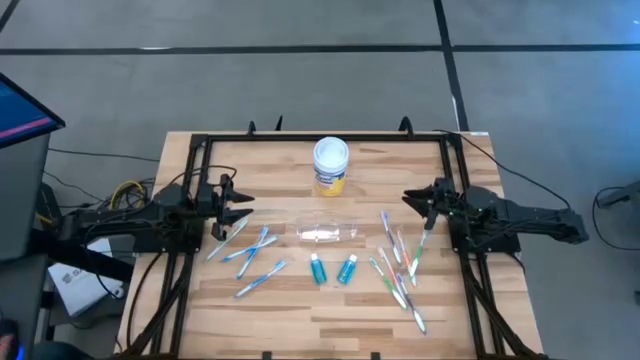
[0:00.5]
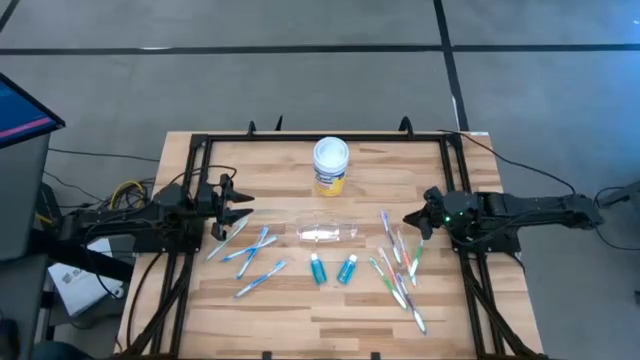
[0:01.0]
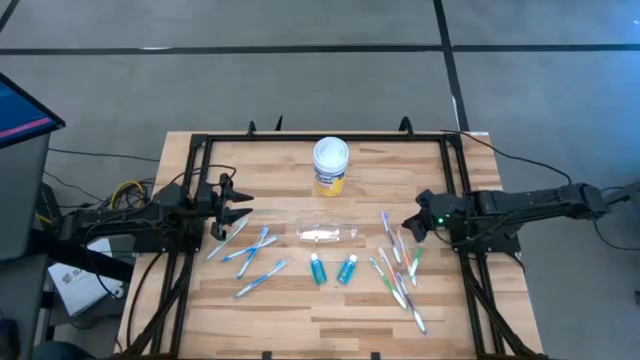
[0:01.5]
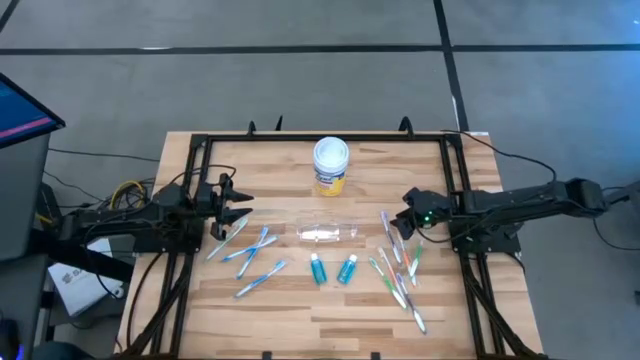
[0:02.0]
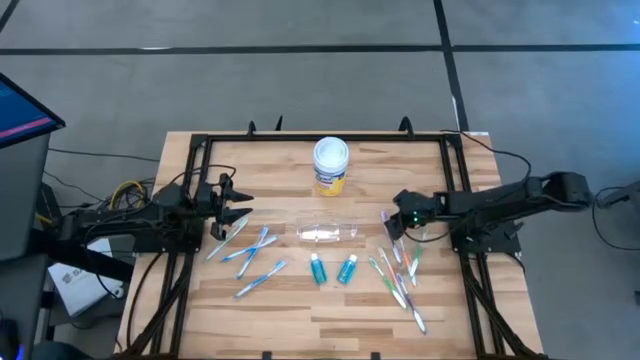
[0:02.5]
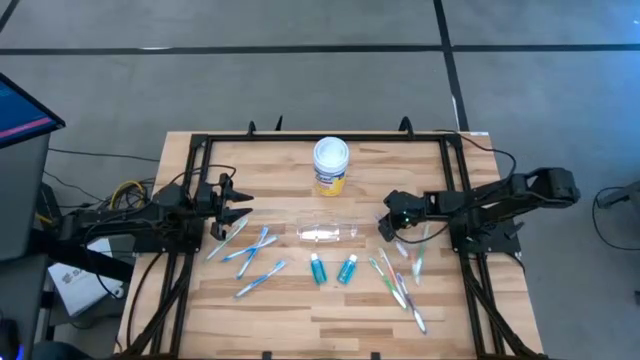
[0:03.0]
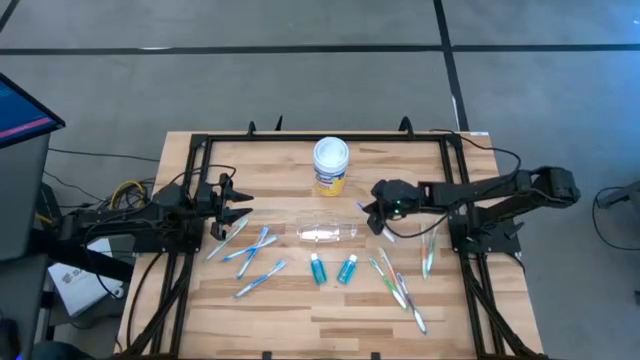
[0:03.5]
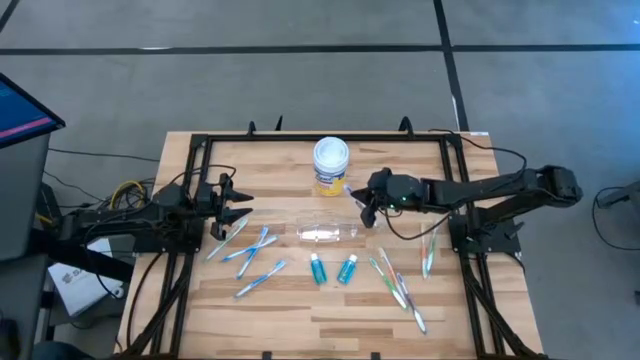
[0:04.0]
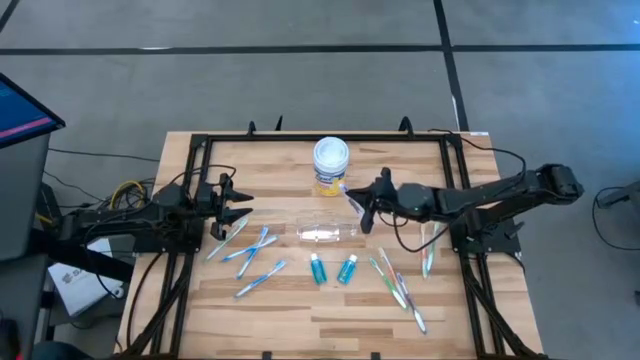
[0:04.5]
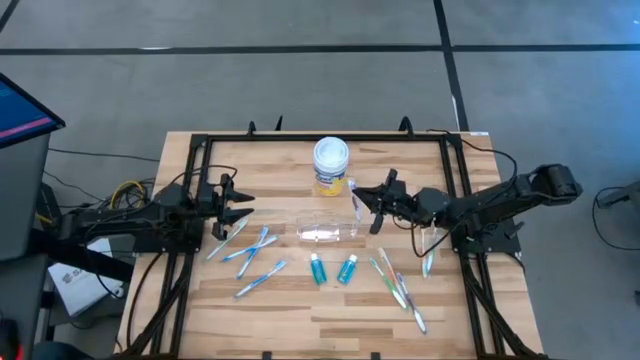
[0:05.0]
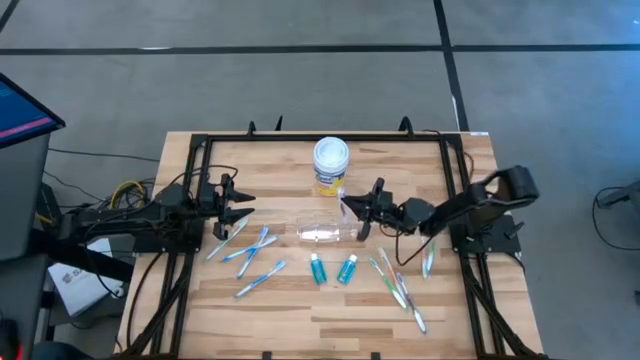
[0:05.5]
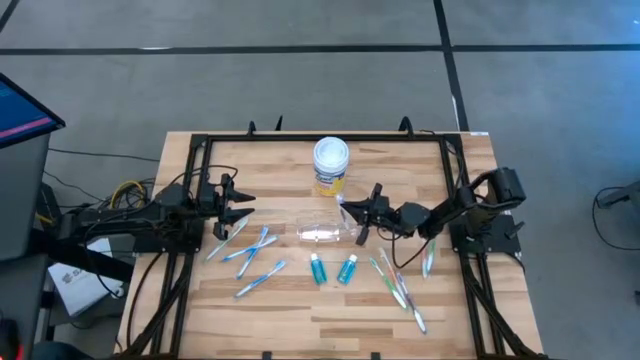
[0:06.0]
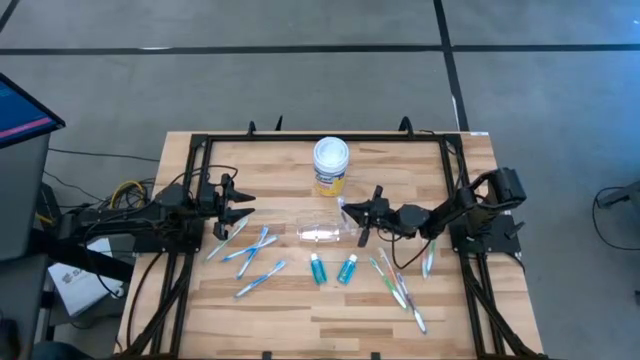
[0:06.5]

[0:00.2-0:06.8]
Task: Pick & Place toothbrushing station
Put the top violet toothbrush into the transparent organizer

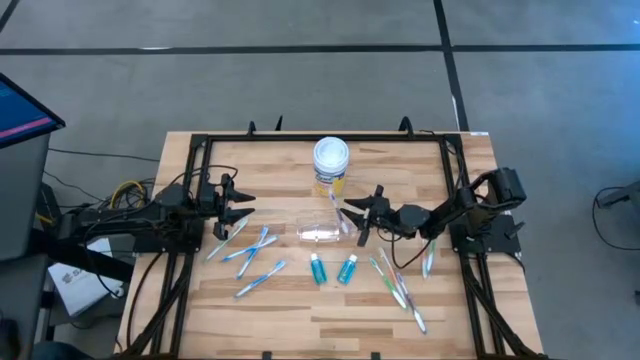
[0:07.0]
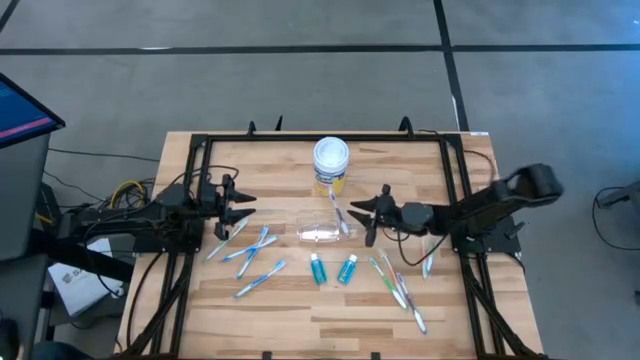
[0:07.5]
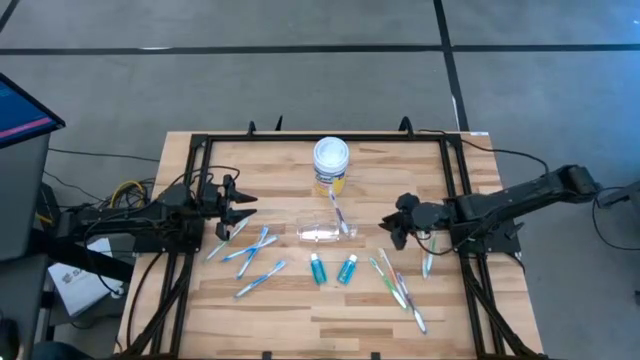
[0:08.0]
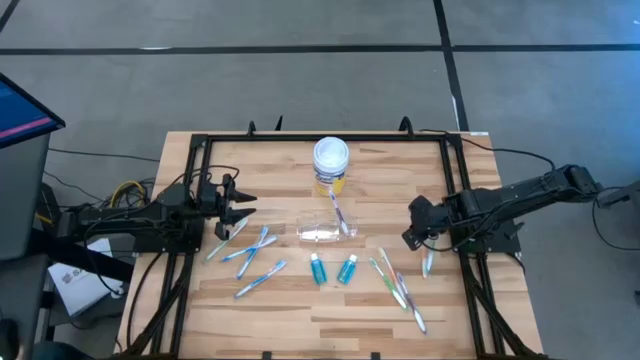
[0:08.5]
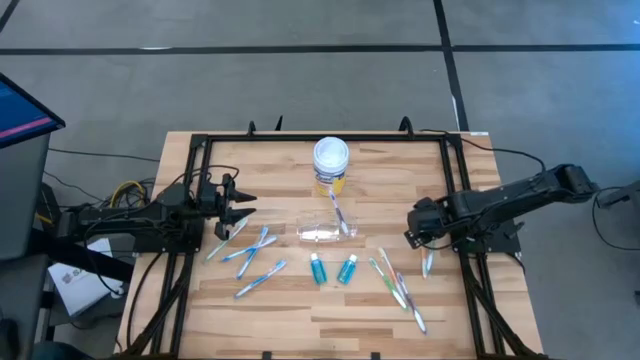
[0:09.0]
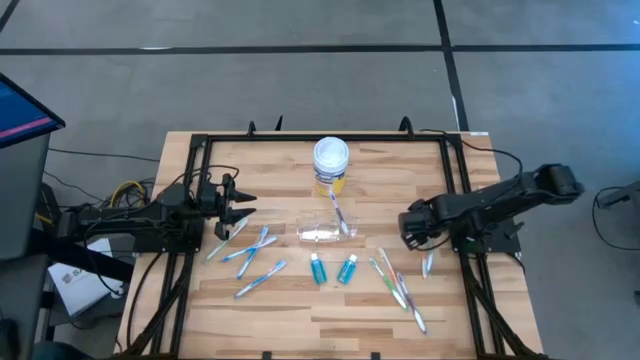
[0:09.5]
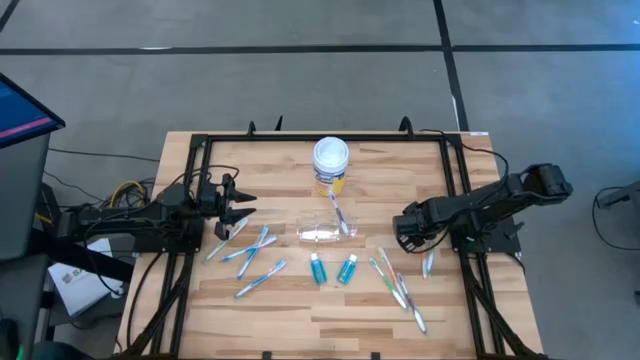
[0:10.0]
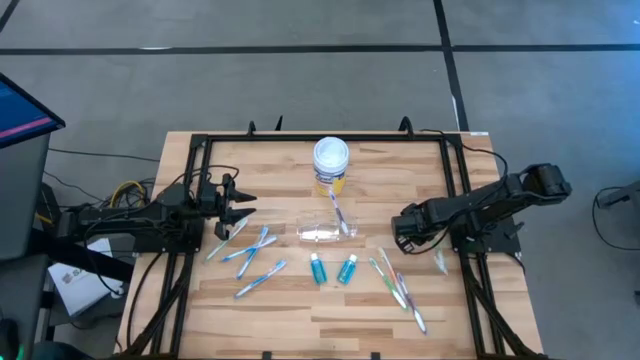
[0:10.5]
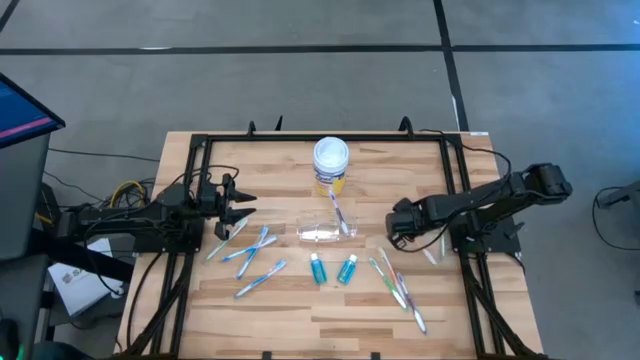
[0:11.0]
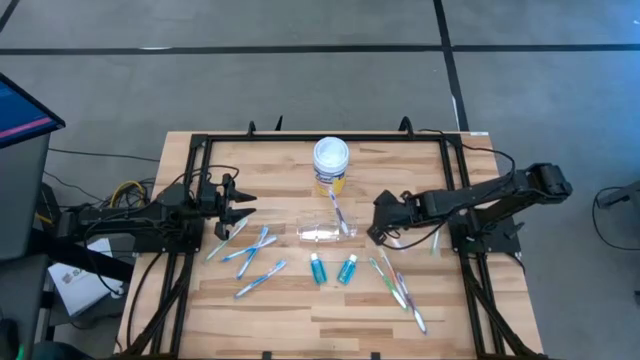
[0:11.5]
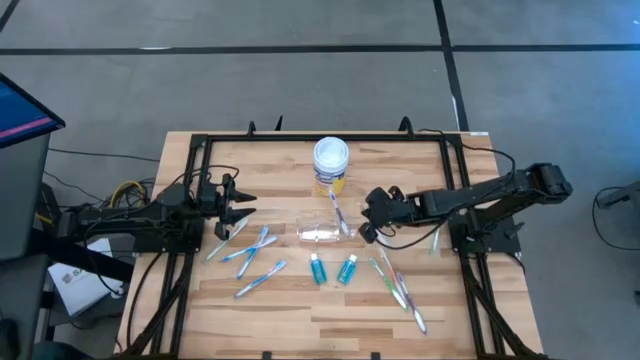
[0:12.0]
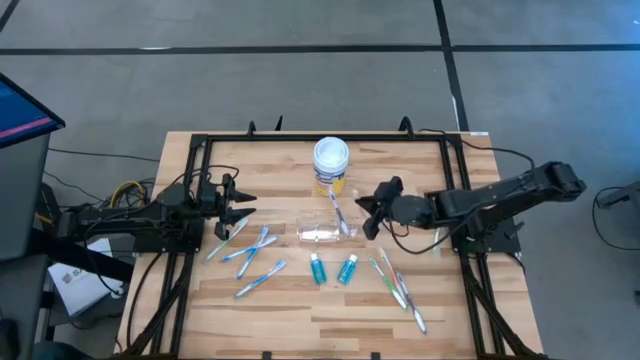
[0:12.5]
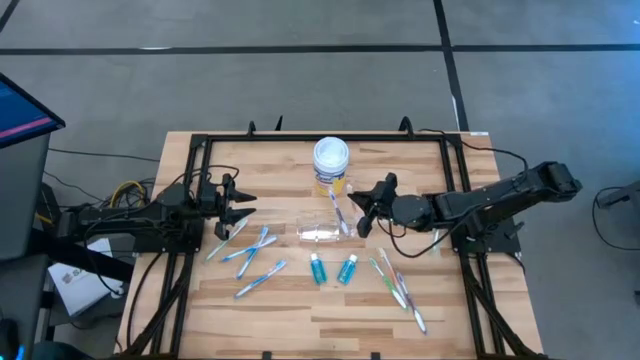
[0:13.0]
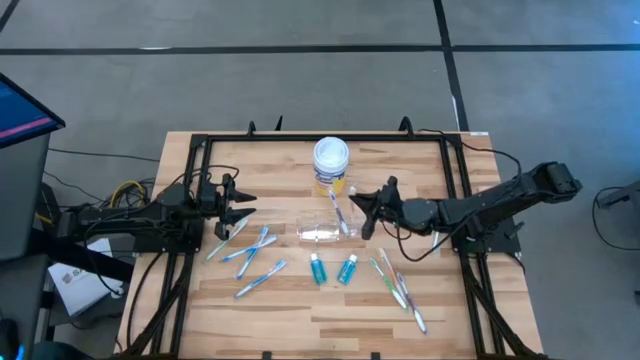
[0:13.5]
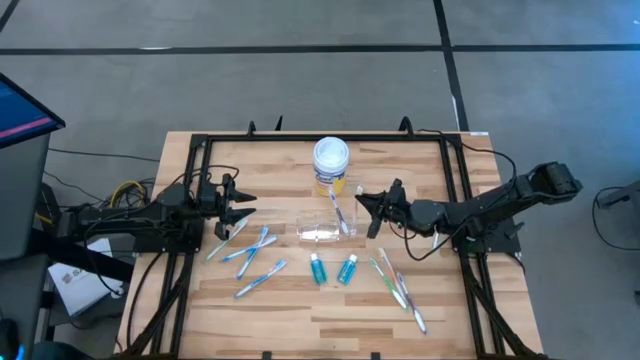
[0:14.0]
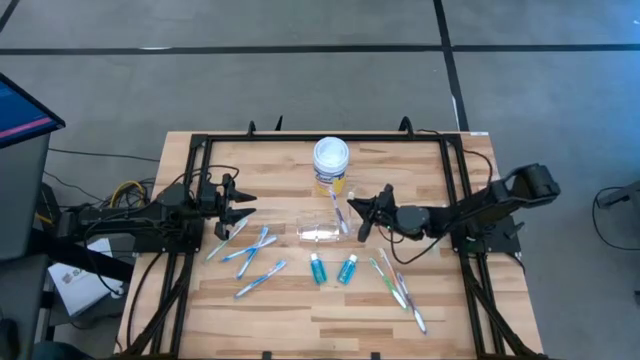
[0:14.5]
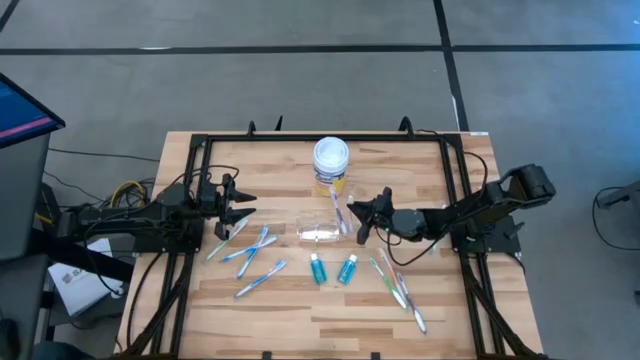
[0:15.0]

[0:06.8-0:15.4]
Put the right orange toothbrush into the transparent organizer

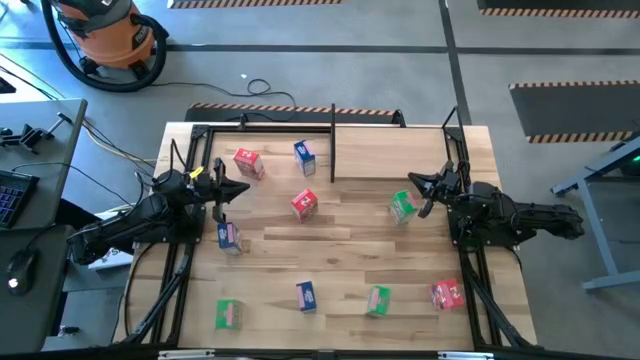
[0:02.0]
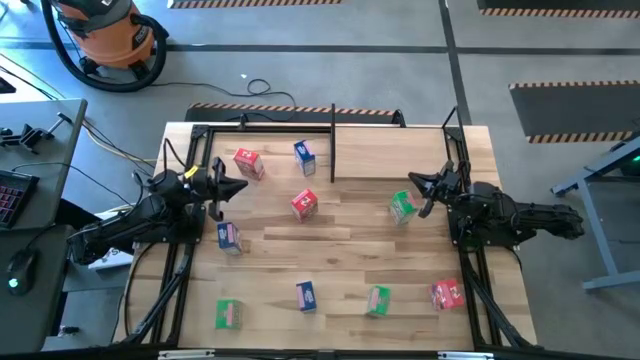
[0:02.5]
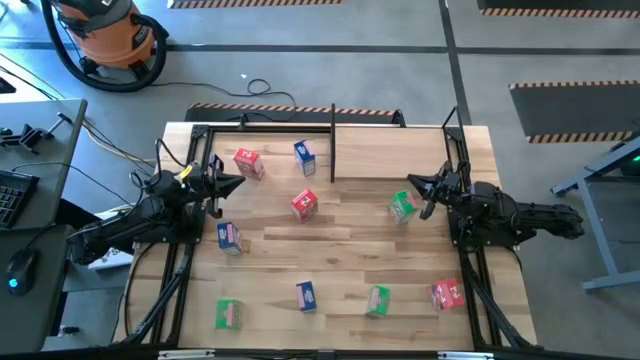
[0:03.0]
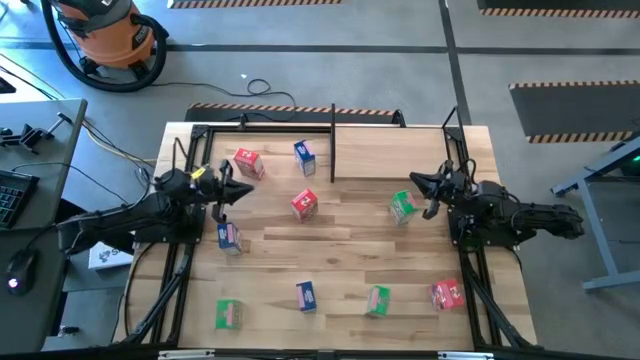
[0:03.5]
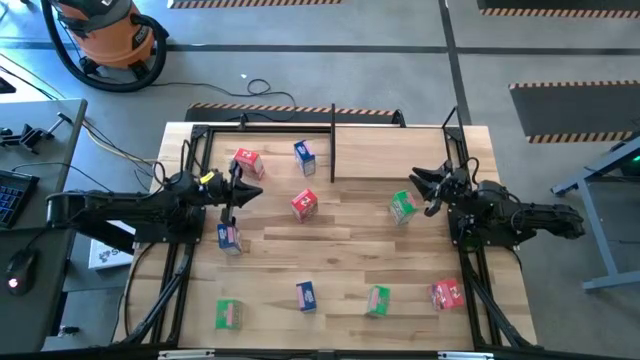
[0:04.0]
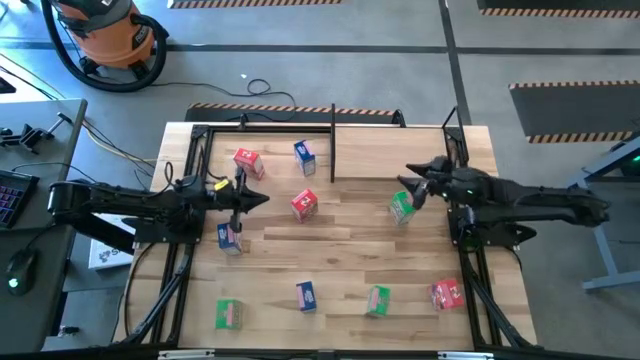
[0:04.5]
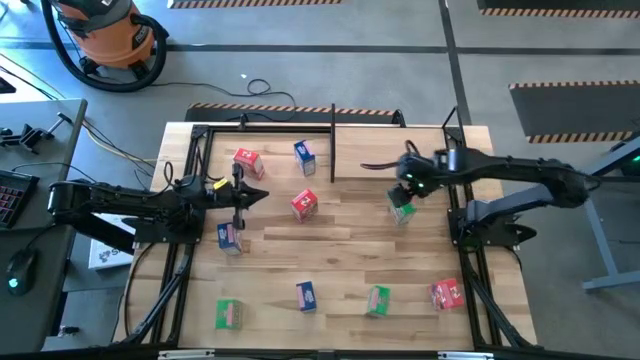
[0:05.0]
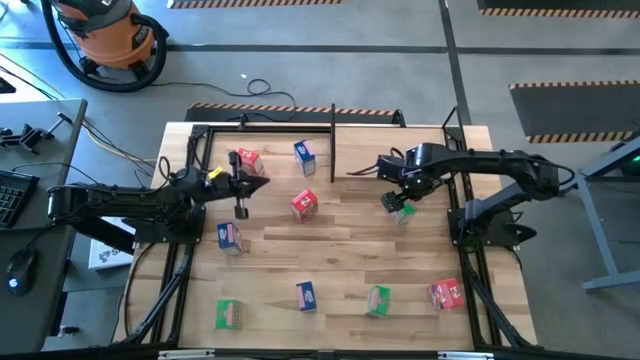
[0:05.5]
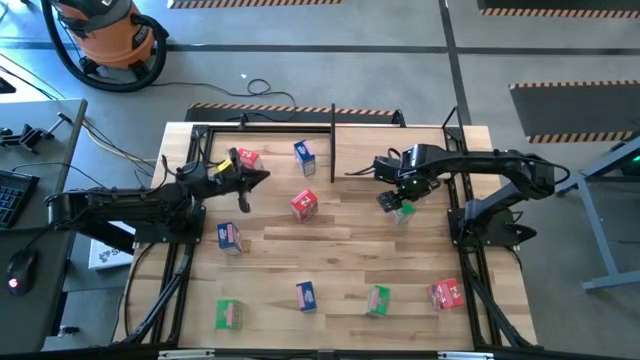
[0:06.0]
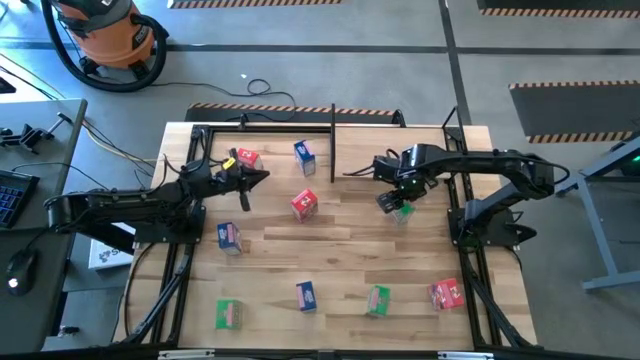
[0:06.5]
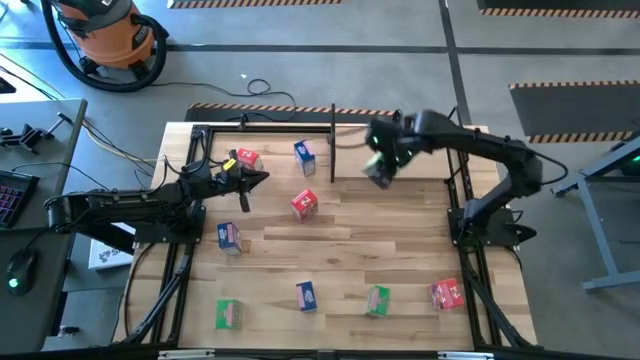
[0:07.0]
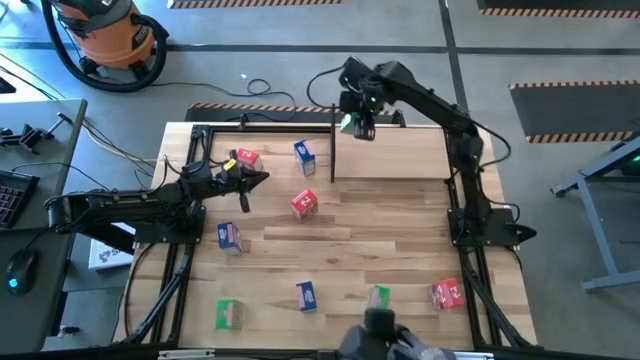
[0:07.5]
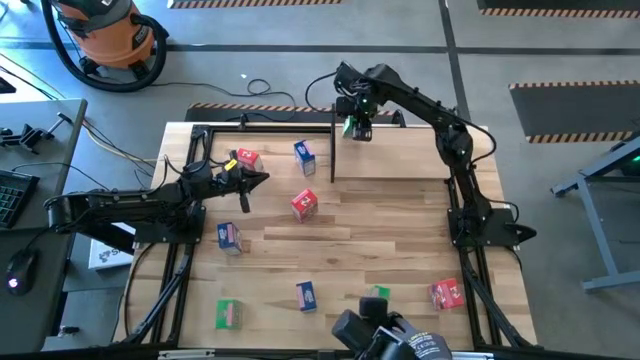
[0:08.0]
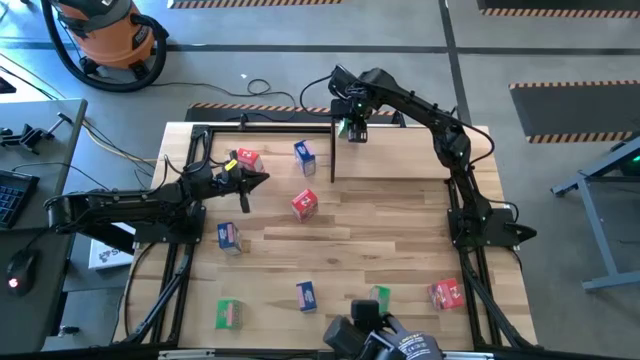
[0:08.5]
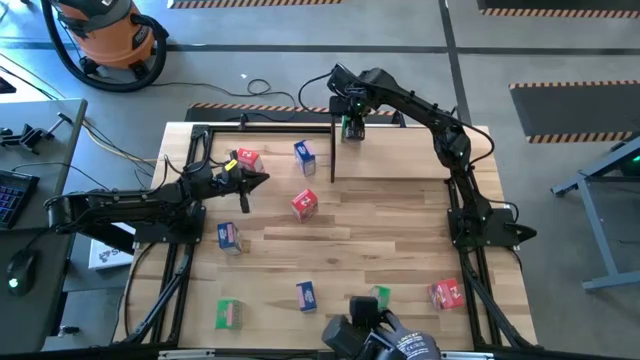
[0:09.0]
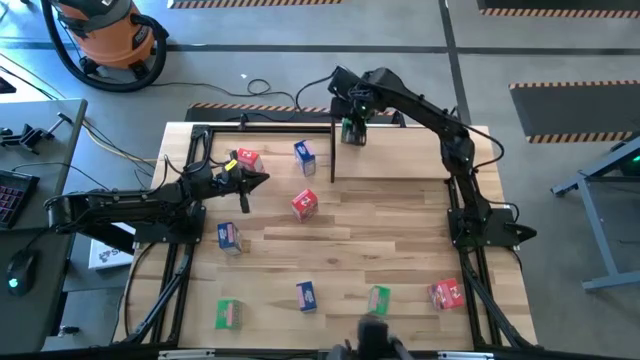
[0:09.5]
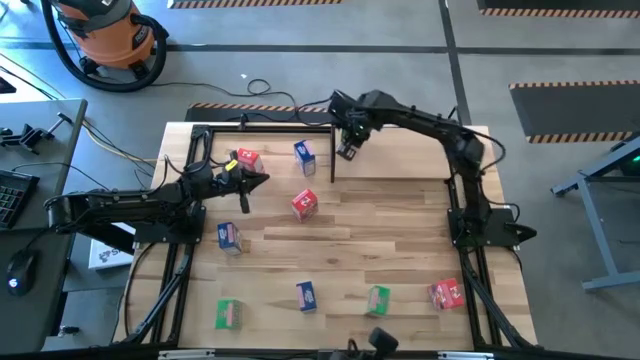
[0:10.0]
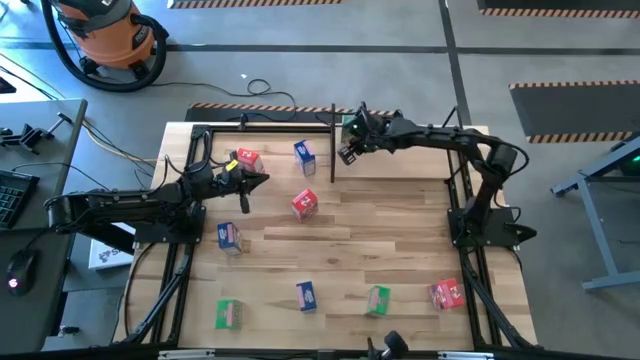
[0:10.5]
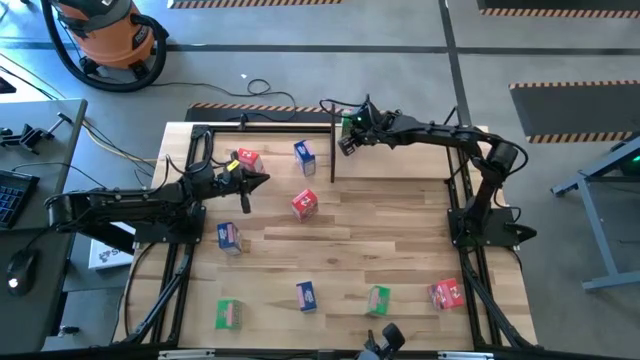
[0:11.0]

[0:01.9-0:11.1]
Task: Stack cereal on shelf
Put the top green cereal box on the shelf
